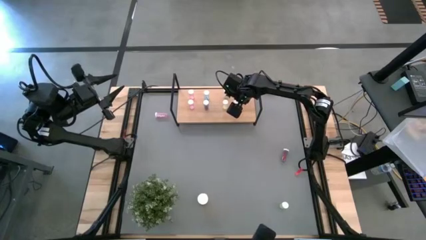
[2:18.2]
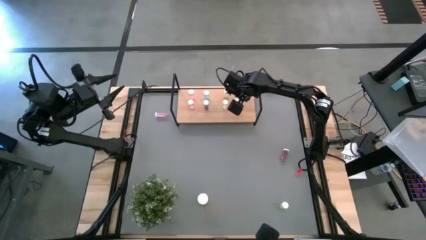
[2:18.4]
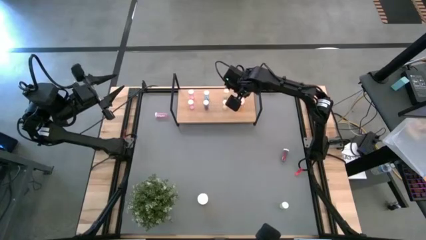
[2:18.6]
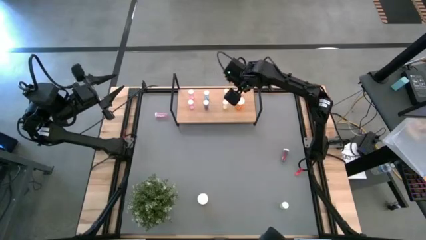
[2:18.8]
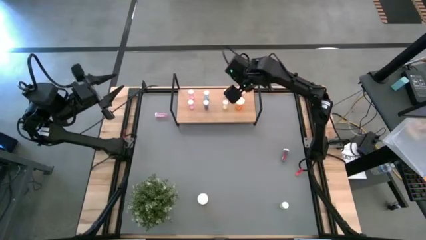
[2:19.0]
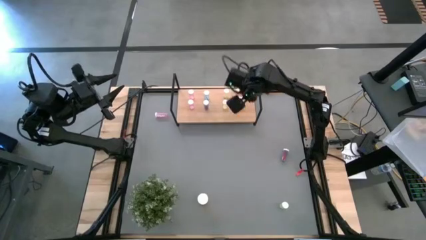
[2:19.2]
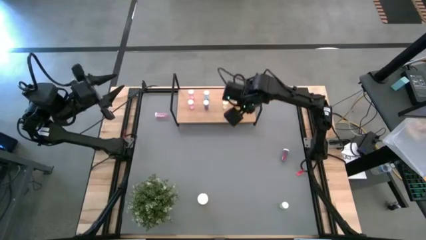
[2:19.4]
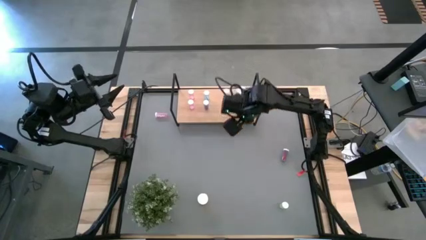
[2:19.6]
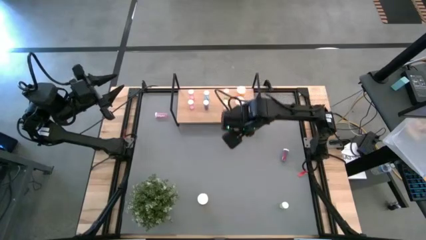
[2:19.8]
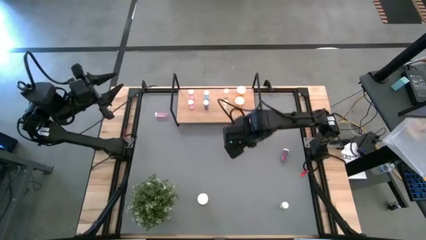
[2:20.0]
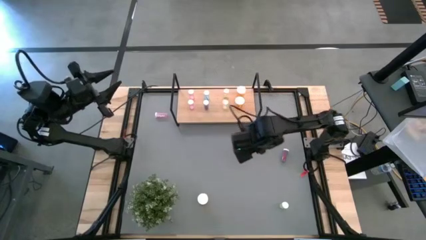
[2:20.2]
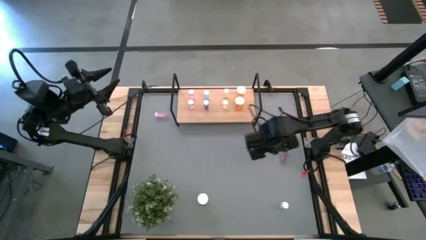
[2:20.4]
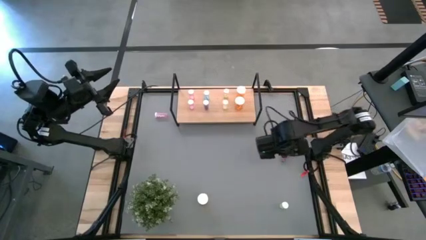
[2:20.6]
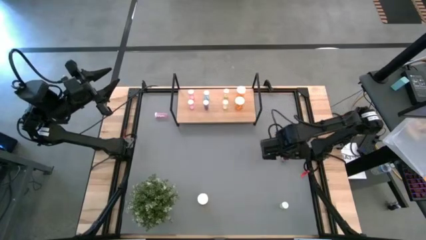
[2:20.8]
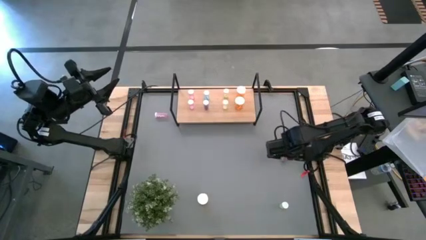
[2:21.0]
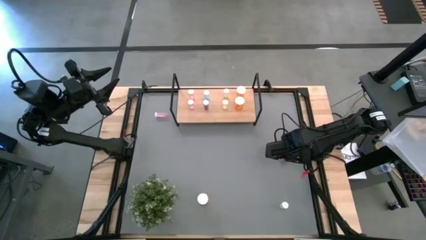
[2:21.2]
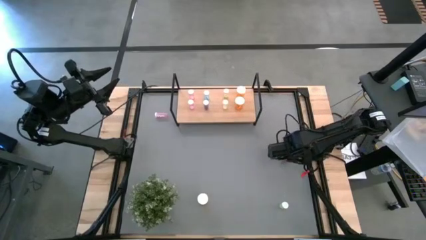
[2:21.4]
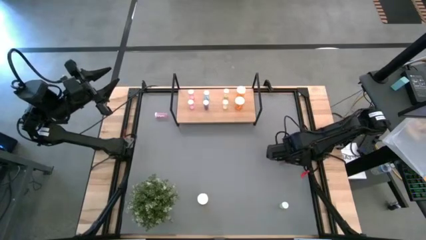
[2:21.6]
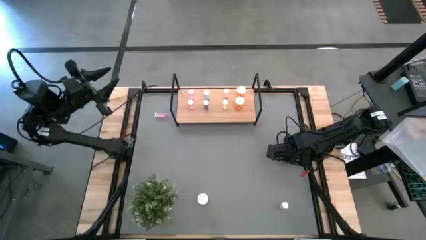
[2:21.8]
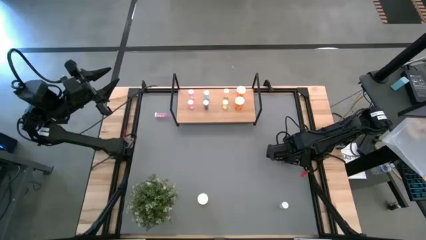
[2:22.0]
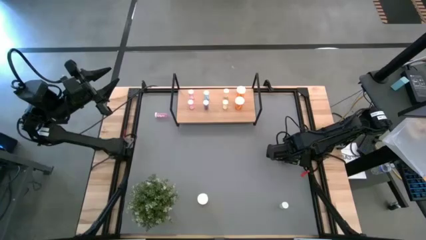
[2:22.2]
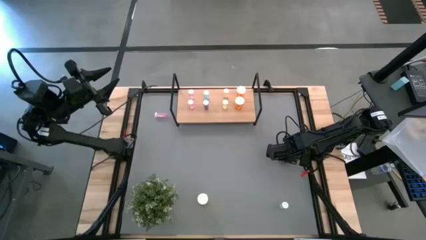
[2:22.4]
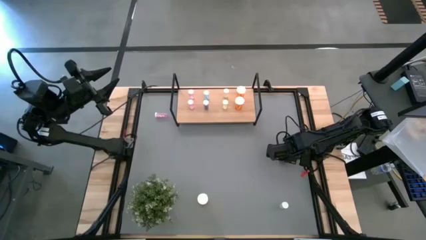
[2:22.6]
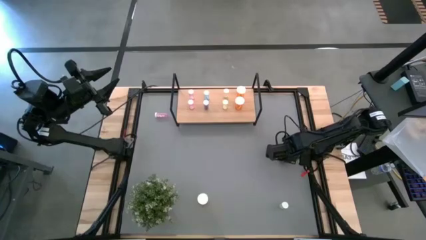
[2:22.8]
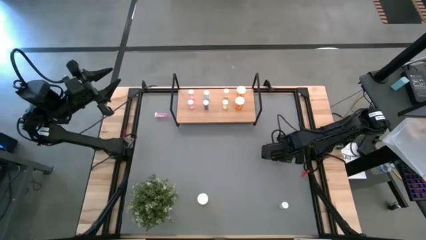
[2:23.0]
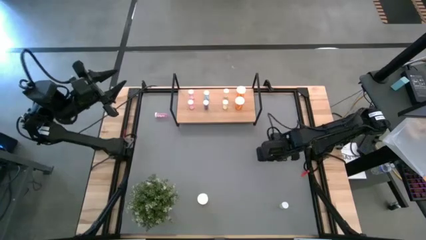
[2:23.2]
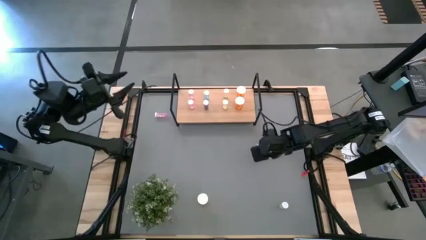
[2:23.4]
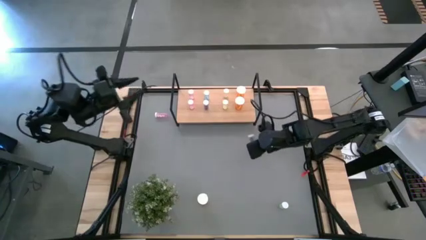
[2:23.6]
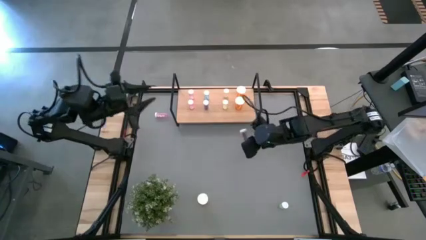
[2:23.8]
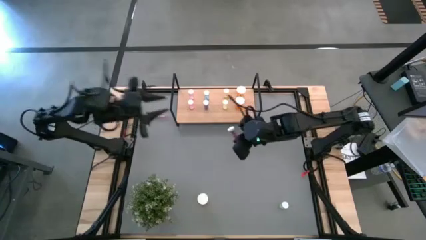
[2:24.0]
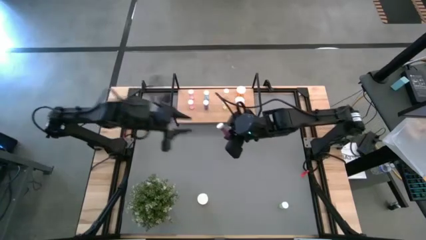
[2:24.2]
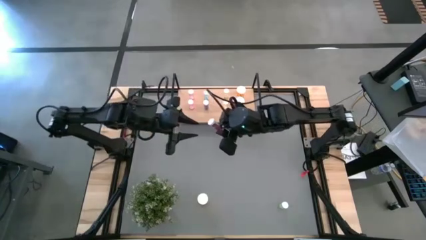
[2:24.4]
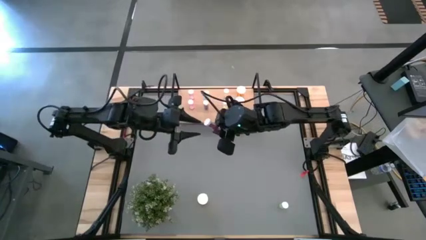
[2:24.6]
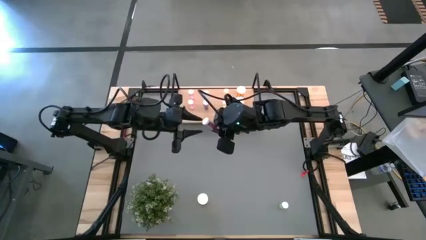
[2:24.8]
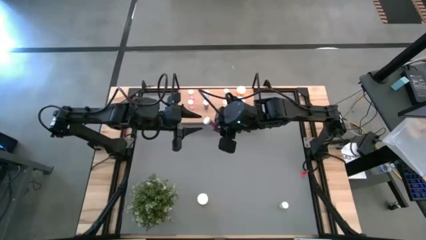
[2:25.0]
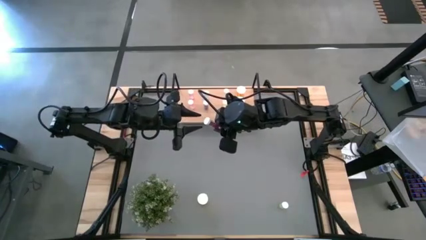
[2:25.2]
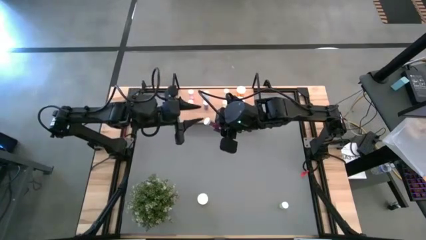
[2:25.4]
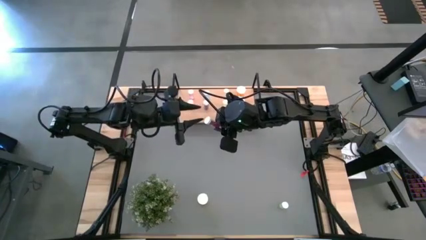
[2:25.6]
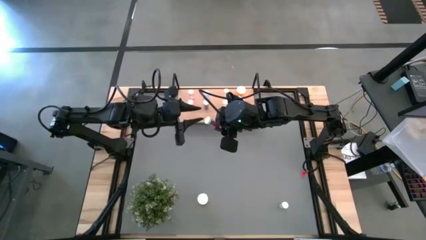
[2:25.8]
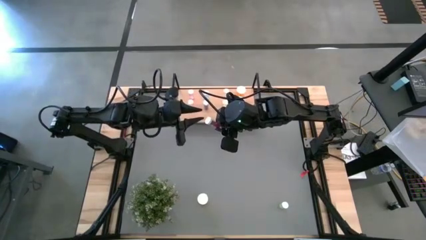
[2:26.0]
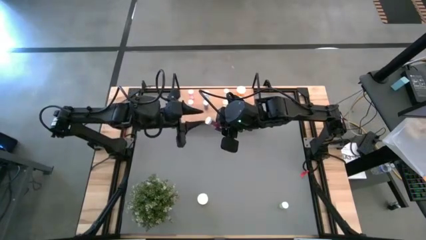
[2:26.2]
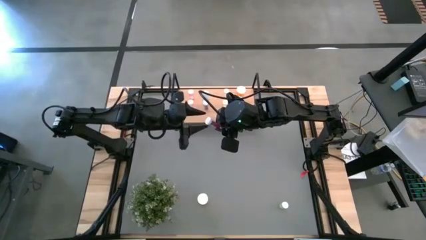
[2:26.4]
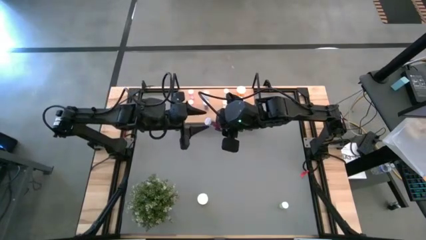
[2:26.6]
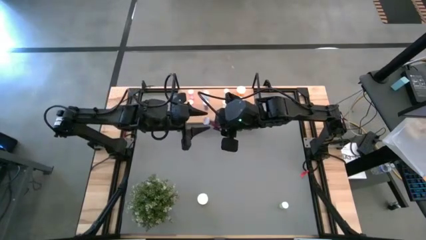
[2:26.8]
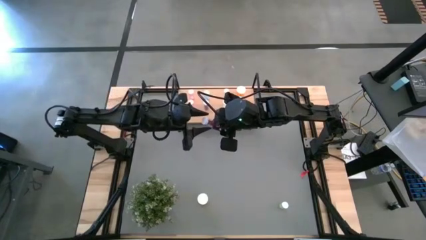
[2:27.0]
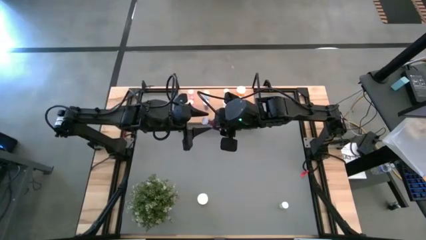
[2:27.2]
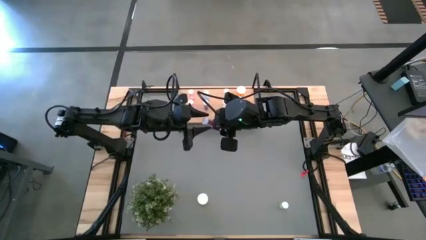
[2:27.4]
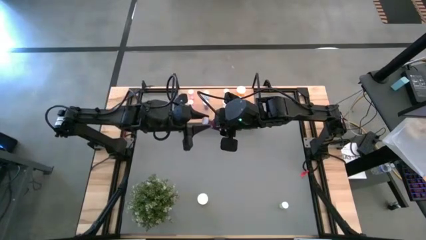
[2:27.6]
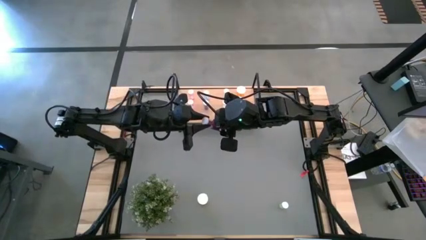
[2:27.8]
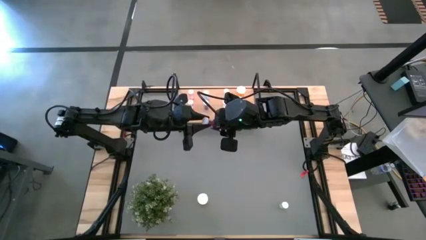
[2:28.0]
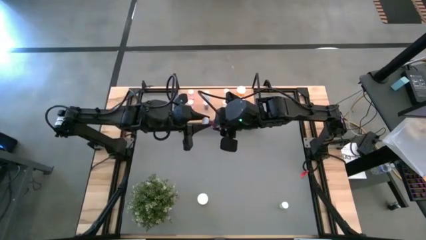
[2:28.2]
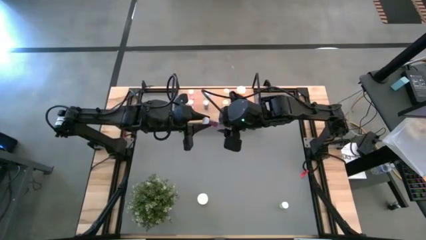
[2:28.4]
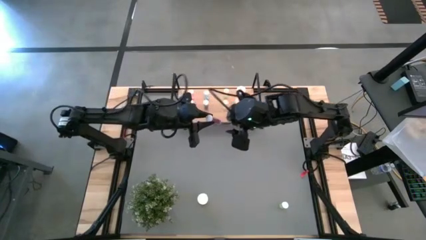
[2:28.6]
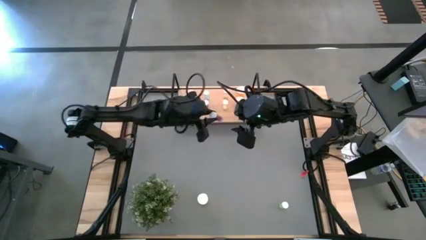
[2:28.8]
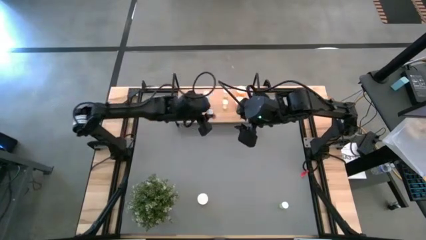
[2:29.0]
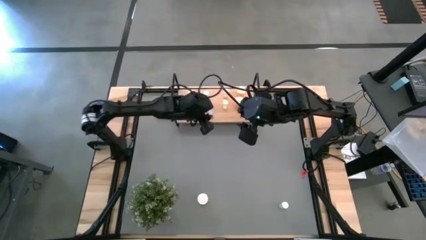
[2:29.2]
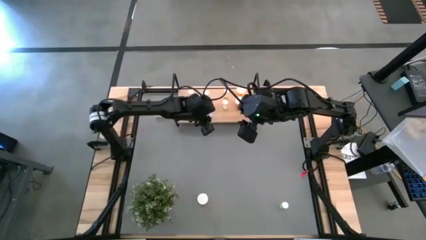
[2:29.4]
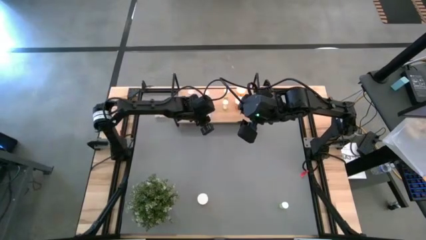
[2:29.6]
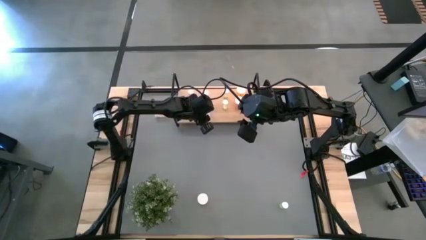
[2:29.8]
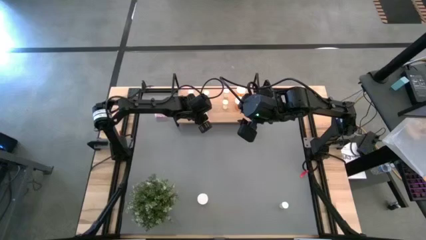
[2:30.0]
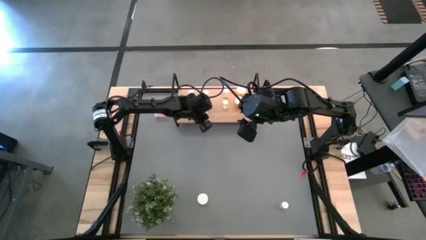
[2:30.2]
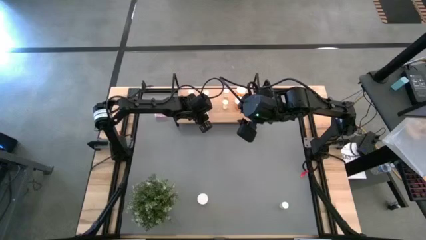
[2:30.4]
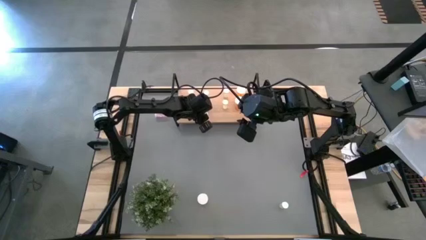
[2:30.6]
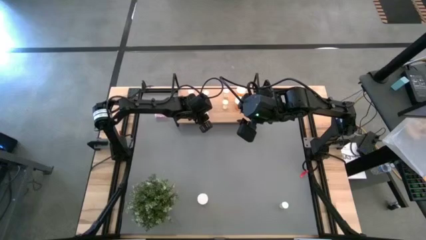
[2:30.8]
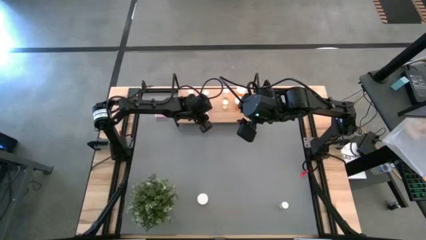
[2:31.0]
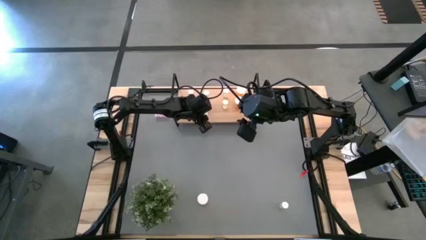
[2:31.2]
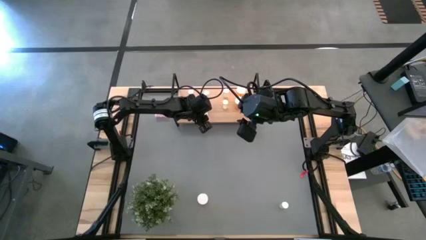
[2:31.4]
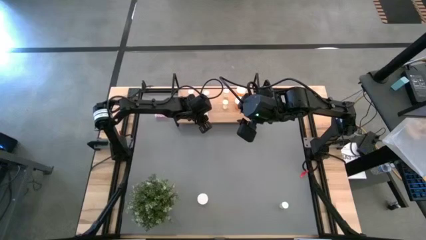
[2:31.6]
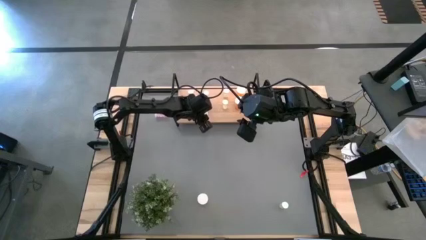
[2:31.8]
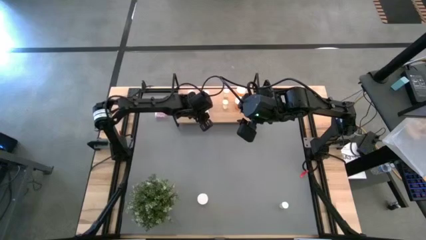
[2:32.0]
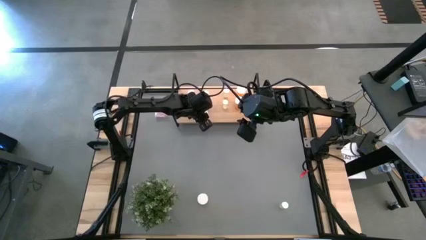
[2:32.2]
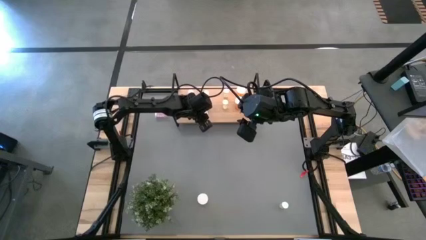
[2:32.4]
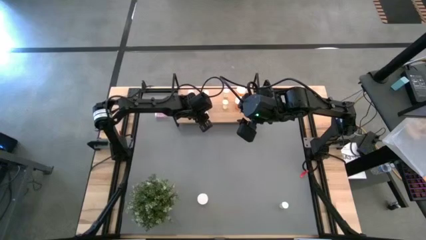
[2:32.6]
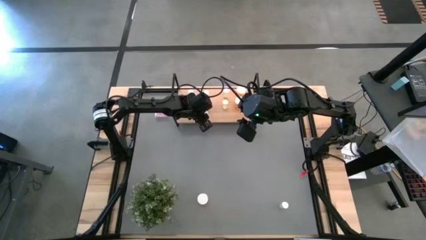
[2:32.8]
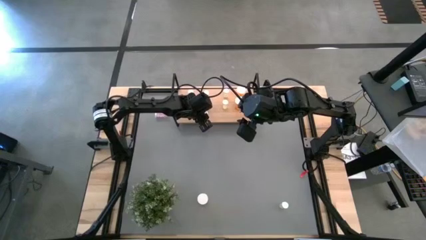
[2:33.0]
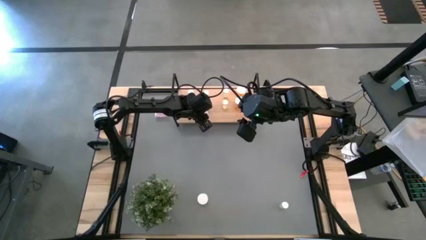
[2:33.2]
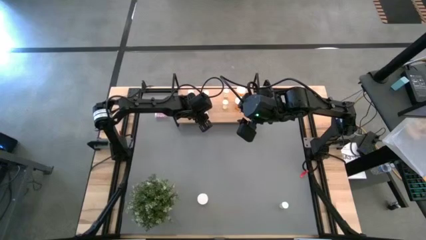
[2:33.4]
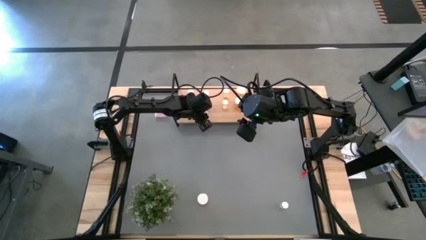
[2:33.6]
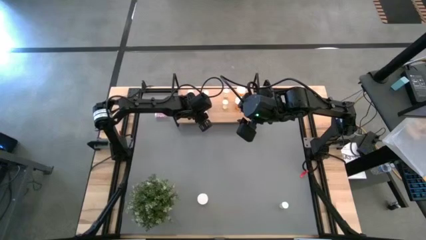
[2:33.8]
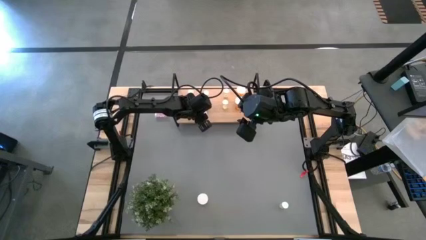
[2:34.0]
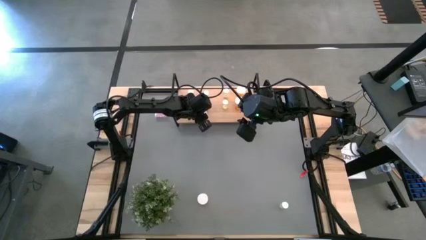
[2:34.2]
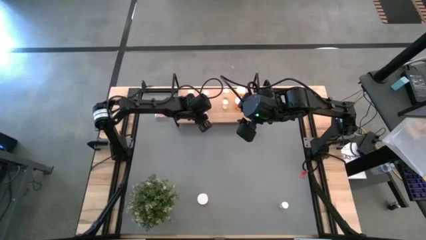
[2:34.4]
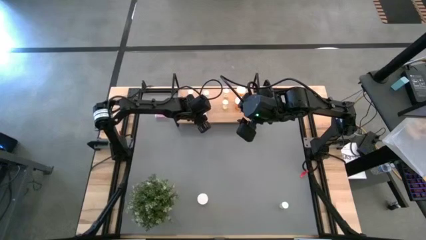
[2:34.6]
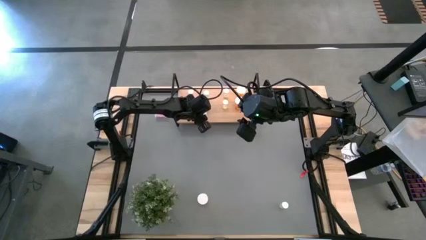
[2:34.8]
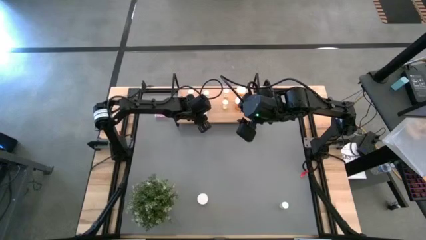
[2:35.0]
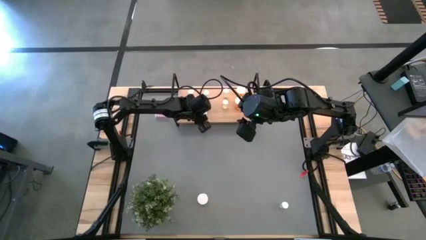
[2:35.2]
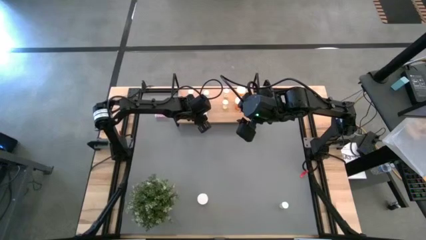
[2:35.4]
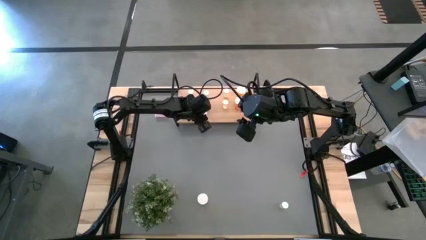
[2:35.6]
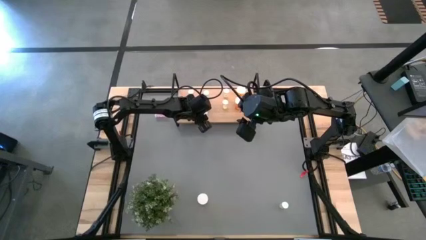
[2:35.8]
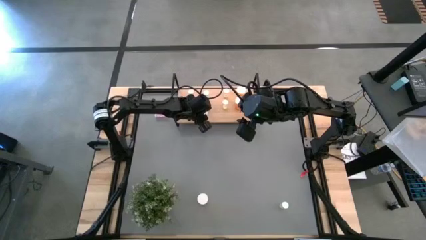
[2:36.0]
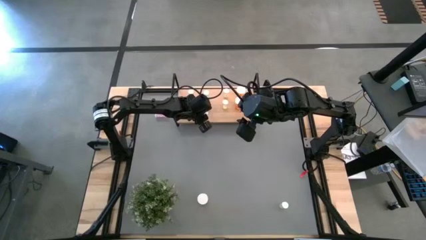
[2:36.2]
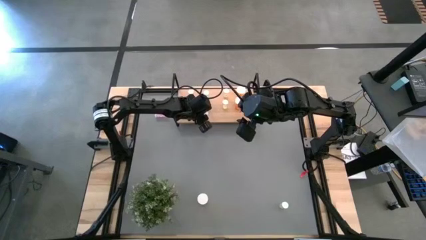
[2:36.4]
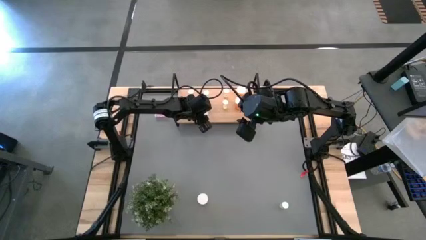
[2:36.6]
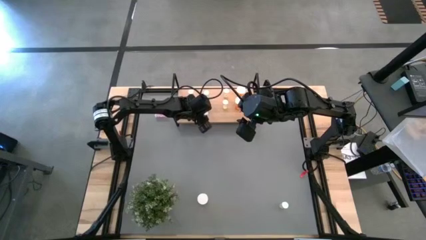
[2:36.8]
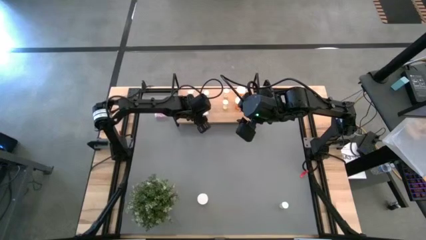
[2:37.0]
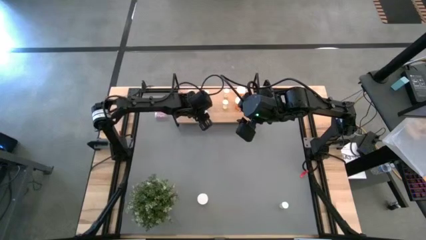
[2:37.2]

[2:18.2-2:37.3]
Task: Pick and place medicine bottles onto shelf by color
Put the blue pill bottle on the shelf aligned with the other blue pill bottles
